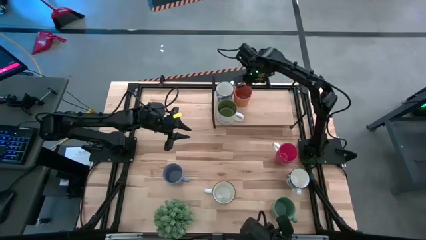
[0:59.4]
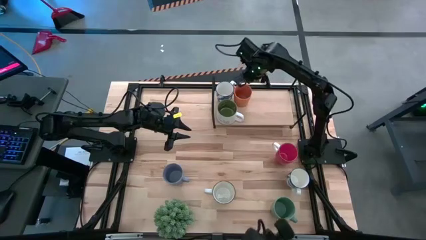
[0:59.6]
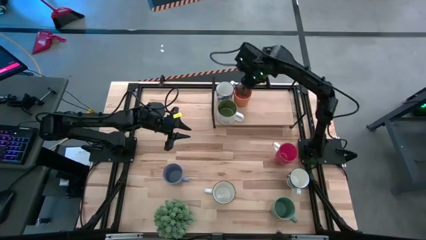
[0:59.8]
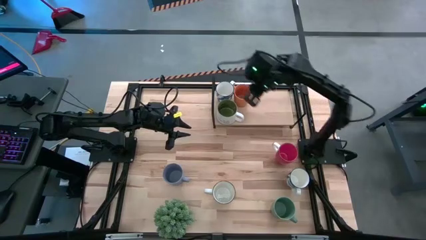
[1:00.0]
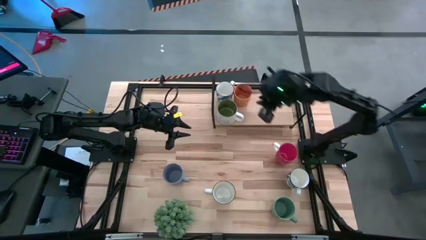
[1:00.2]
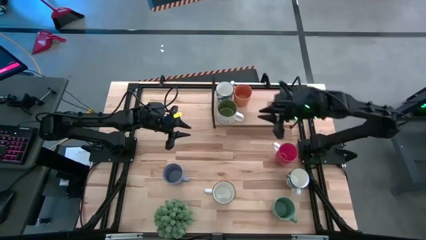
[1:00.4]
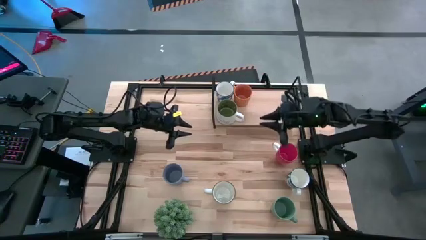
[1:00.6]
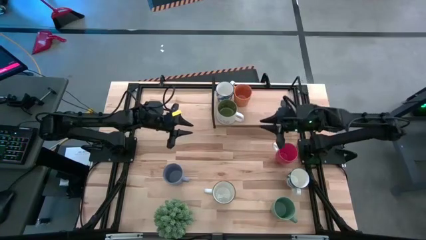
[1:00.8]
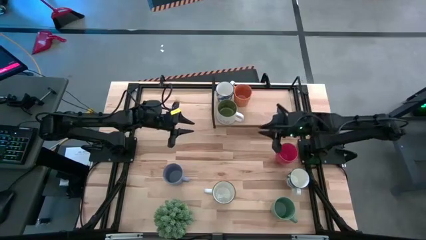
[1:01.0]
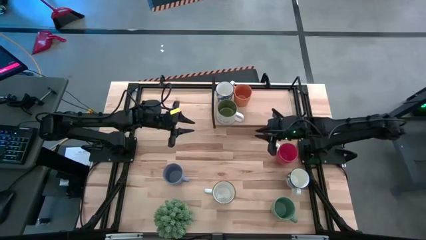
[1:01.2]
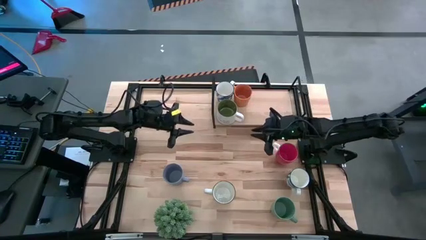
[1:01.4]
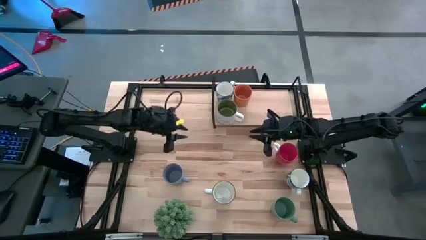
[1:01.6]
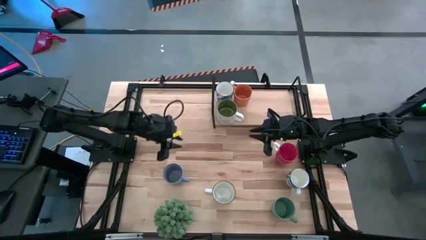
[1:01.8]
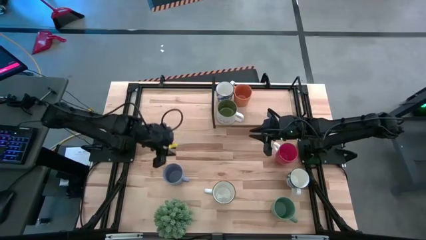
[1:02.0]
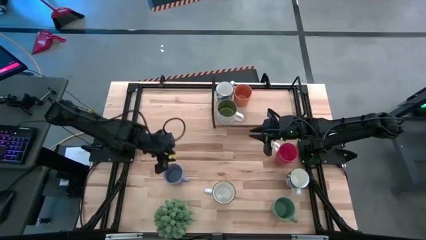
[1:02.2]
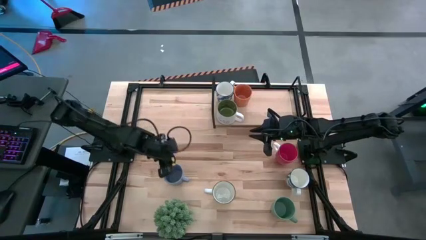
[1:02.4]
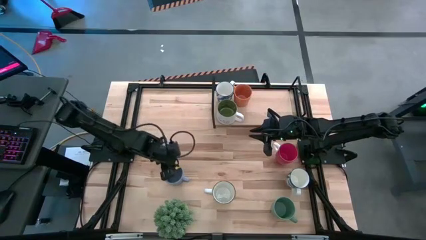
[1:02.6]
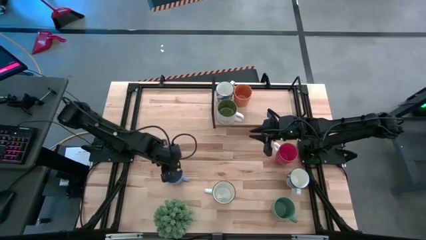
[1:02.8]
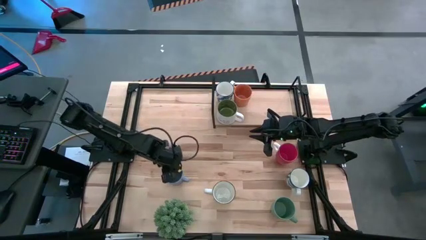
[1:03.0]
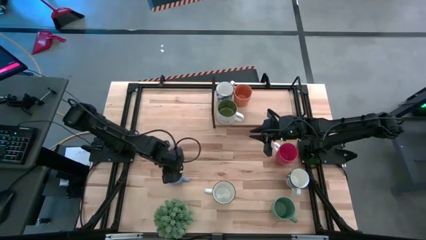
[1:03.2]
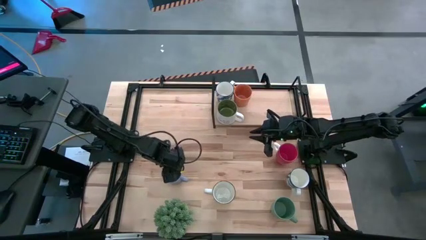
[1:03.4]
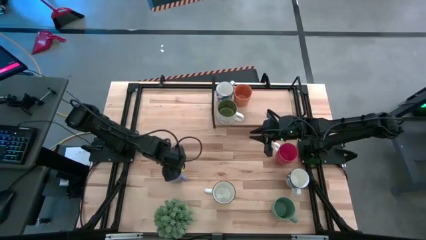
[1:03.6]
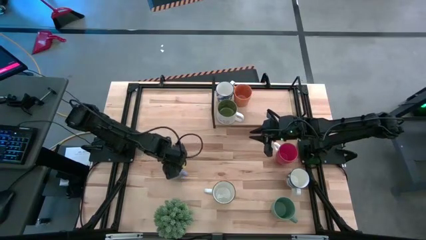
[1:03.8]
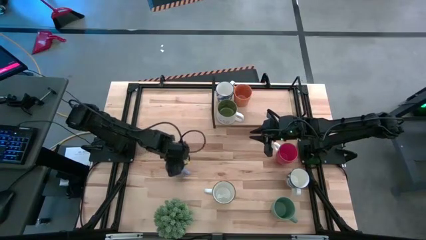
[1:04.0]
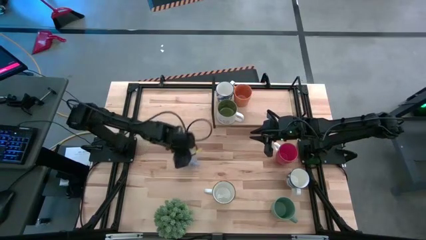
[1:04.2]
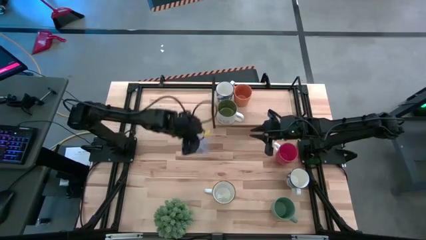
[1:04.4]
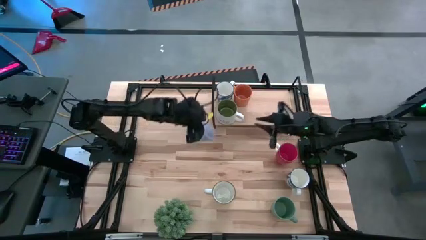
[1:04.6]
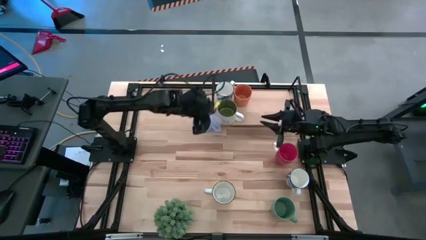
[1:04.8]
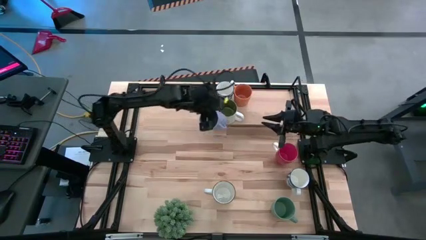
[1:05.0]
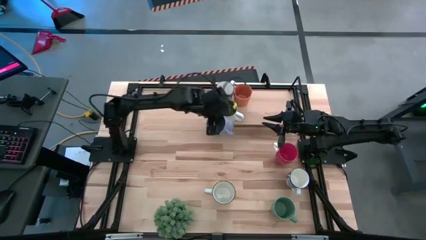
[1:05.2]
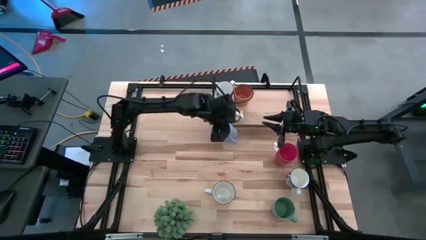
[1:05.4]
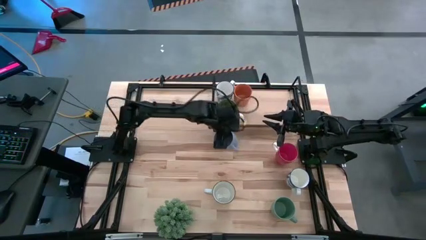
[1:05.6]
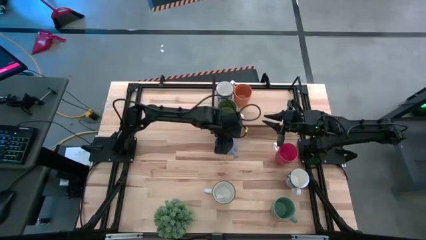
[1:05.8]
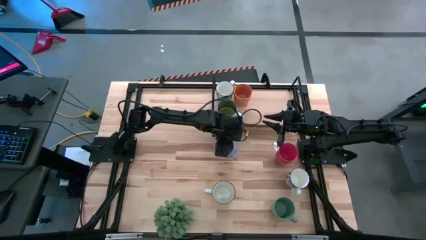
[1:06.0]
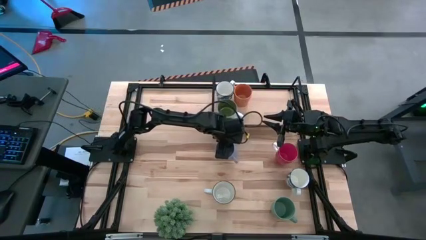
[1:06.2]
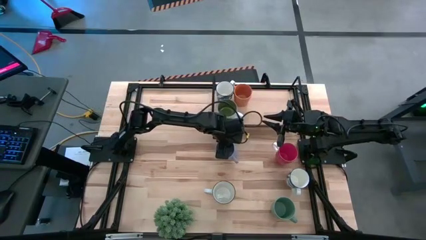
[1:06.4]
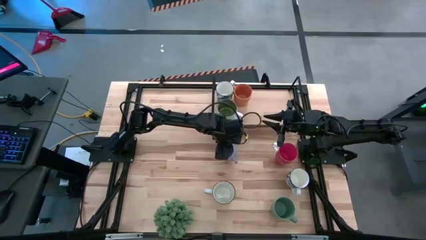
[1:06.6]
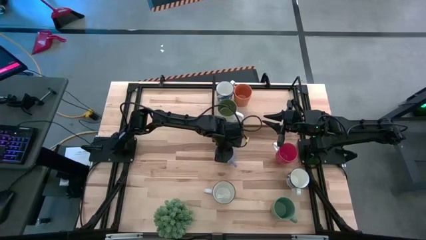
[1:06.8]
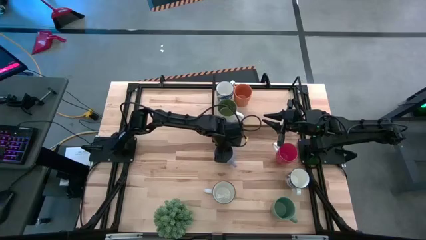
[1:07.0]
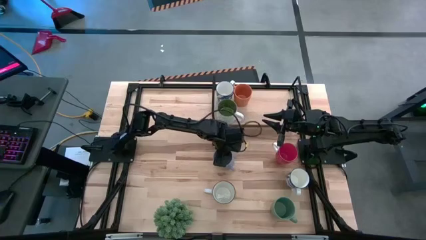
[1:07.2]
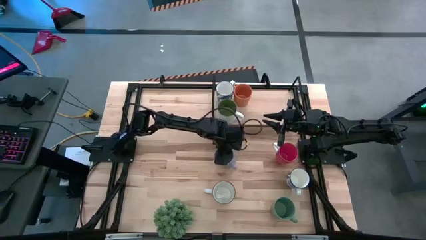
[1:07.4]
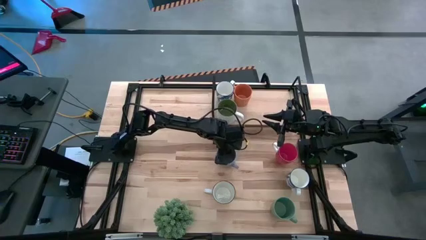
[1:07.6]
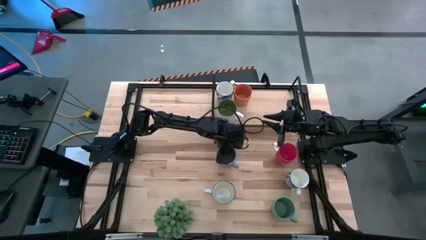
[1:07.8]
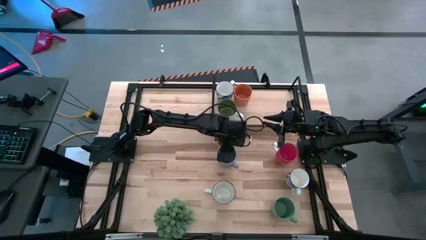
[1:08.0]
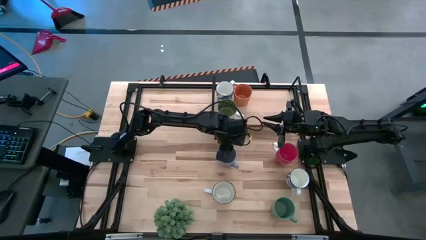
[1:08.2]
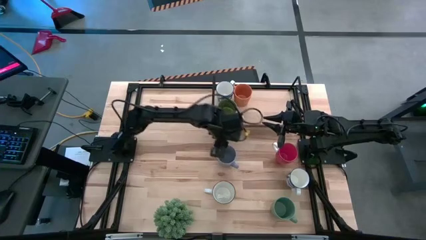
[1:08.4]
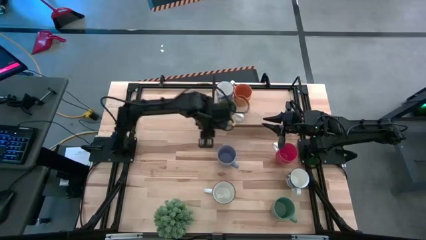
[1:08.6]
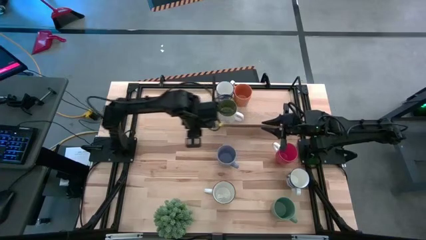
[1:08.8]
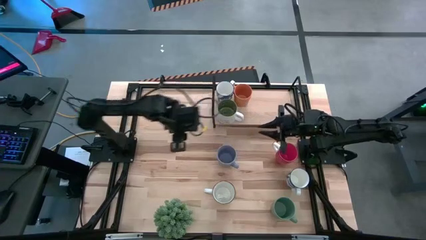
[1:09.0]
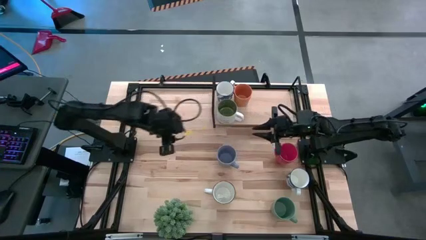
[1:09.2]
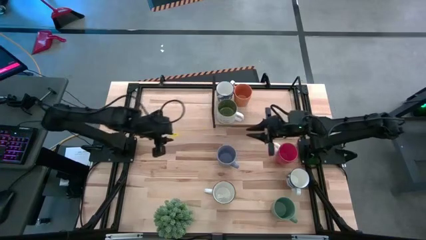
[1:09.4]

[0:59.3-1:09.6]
Task: Place coffee mugs
Put the blue mug on the shelf

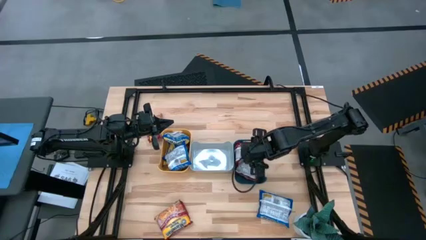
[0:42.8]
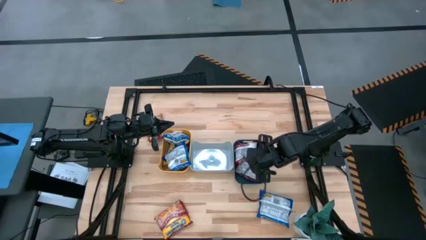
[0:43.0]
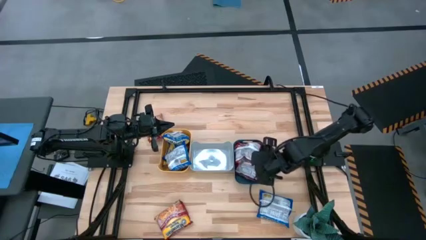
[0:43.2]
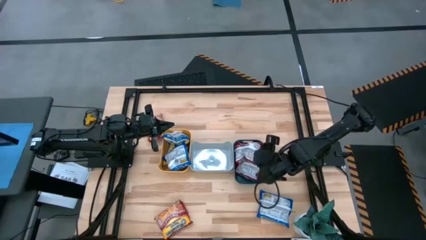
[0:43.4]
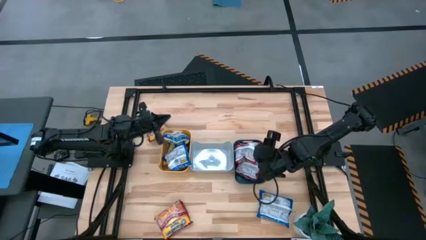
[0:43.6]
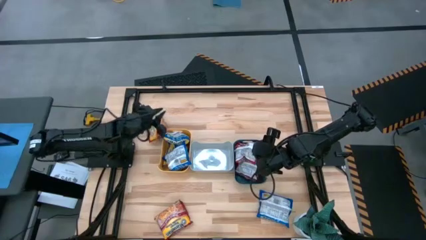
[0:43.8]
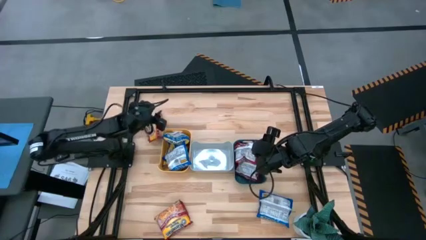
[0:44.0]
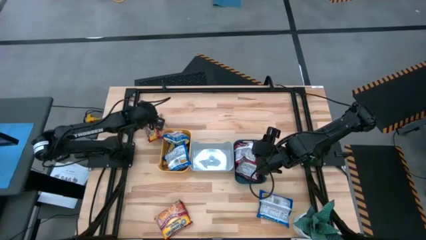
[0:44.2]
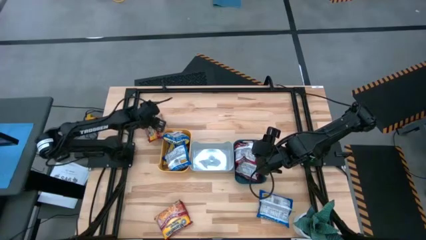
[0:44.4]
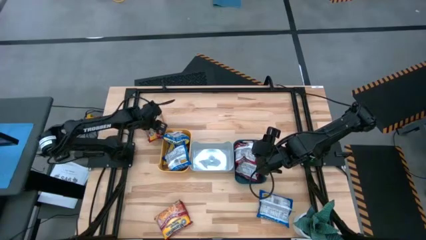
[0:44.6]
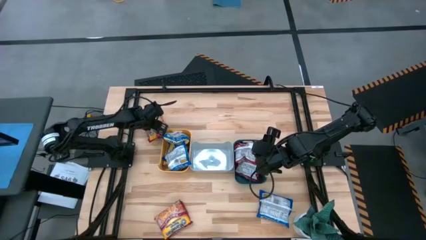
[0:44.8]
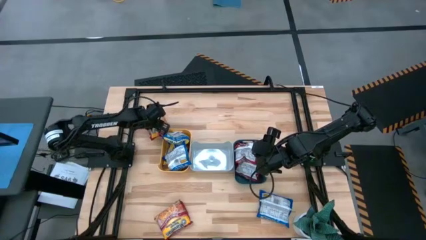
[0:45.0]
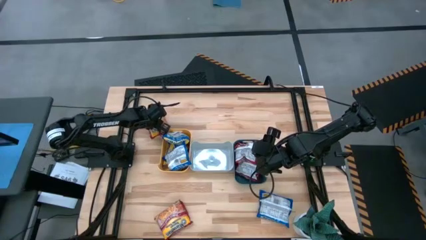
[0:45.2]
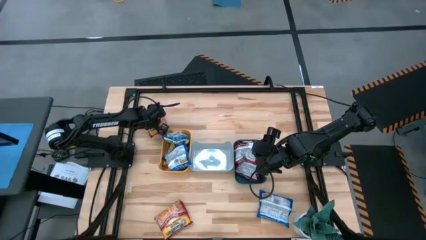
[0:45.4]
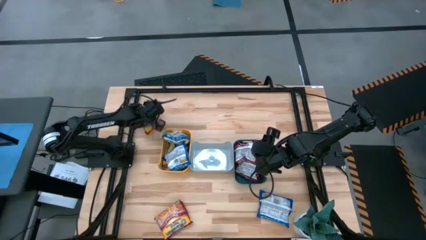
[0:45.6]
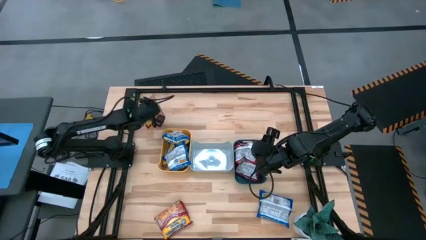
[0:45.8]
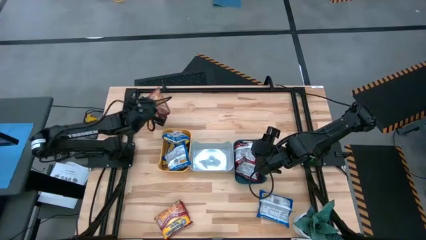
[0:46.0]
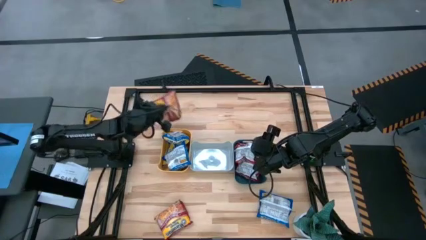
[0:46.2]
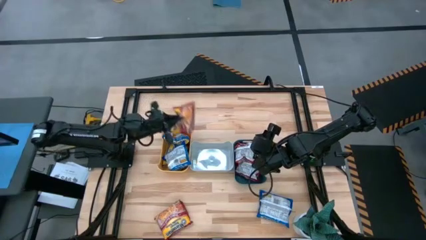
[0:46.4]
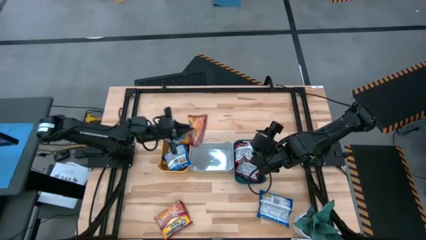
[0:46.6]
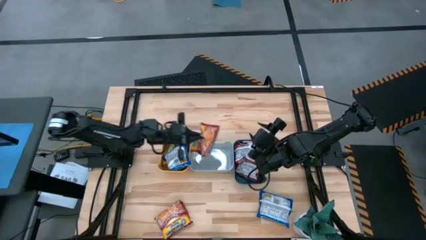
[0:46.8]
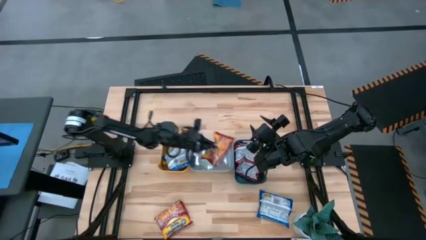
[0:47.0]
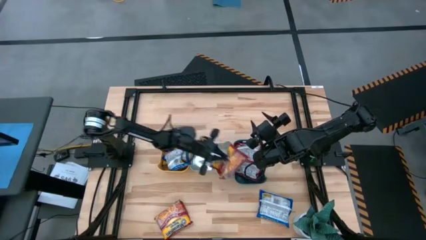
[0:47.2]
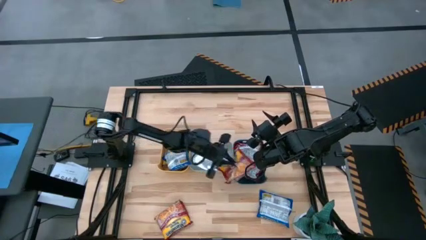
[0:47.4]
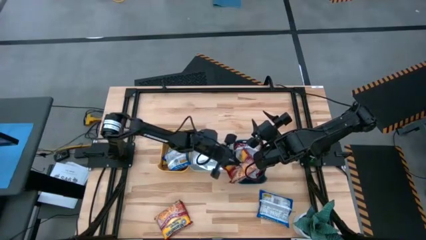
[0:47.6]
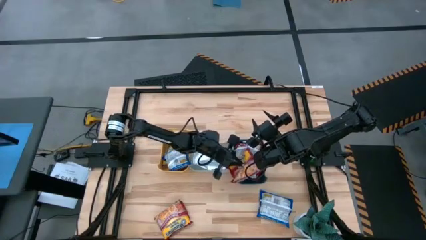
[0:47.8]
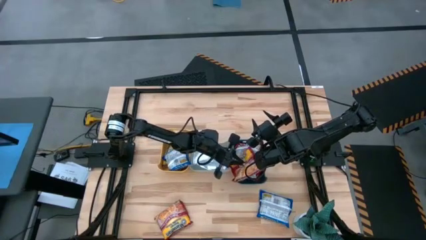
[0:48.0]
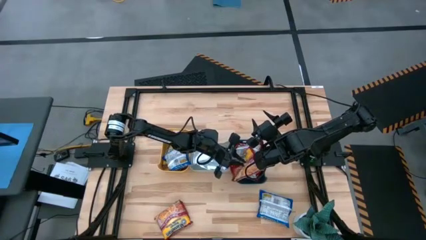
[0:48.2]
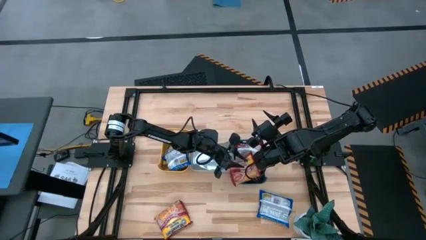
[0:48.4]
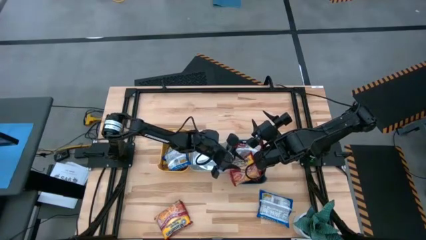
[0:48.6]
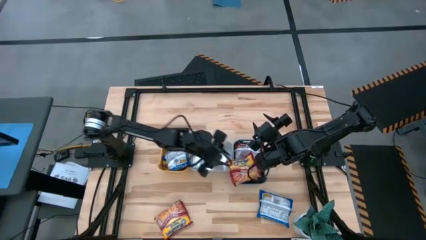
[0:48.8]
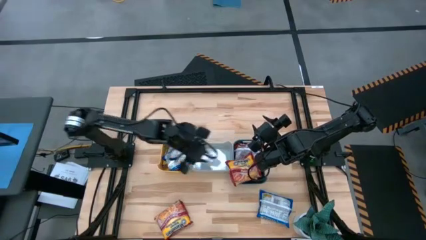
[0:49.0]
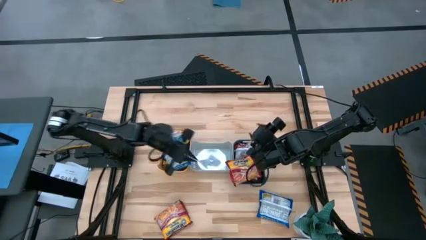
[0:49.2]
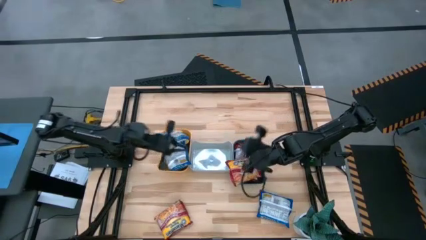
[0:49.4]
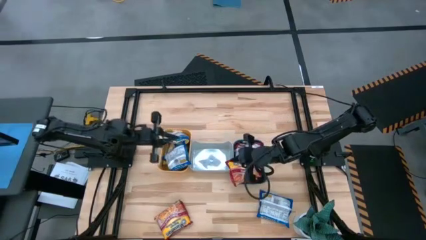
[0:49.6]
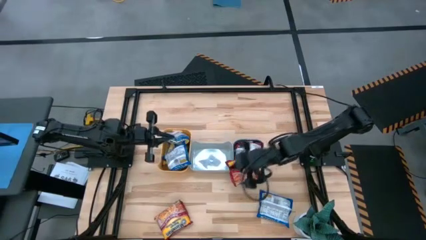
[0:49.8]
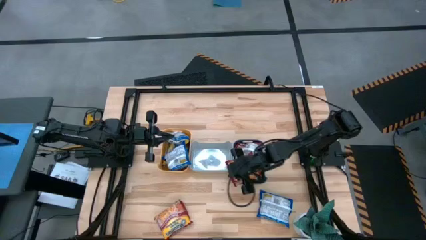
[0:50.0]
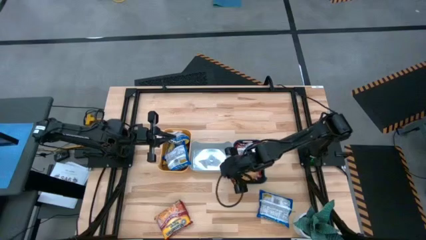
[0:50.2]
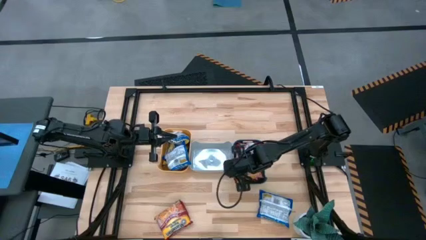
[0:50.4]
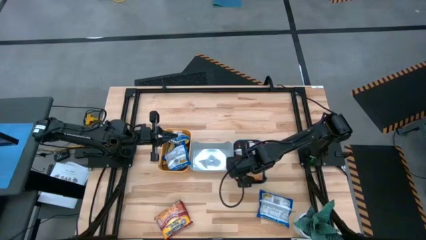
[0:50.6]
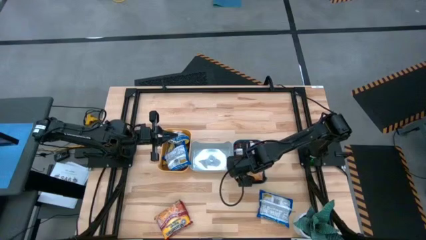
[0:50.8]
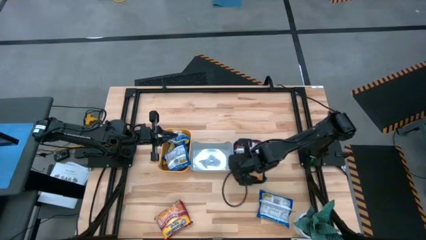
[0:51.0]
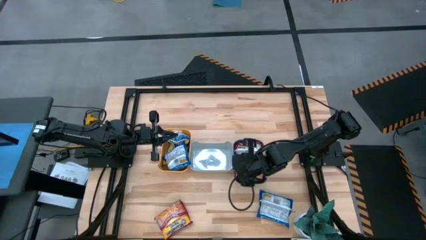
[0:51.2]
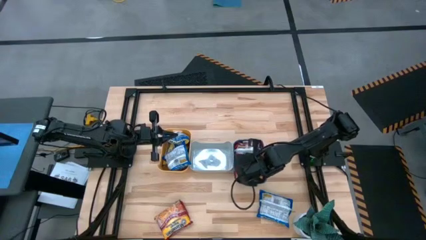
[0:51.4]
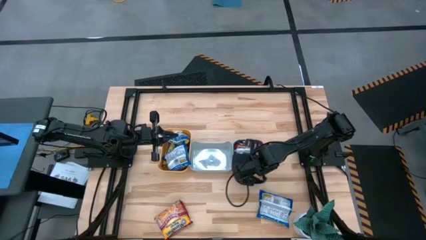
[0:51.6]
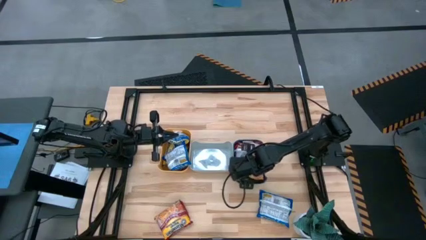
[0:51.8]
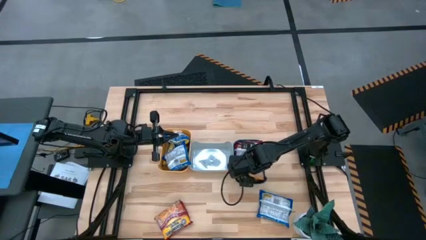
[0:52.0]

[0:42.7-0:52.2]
Task: Sort Maruchan noodles
Put the top red noodle pack into the white bin
